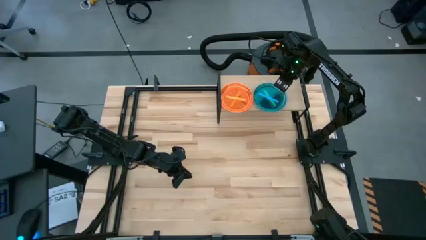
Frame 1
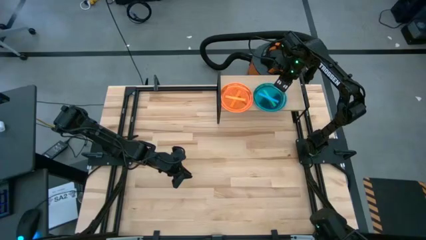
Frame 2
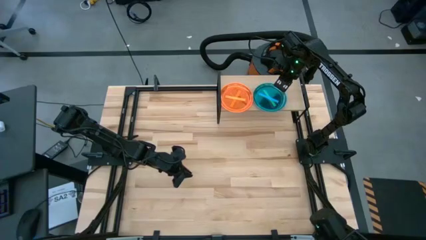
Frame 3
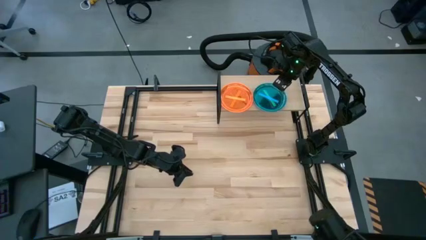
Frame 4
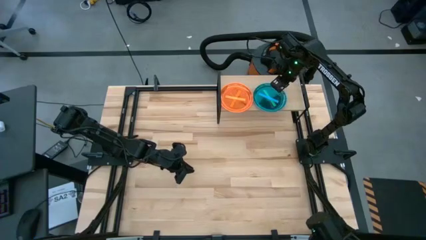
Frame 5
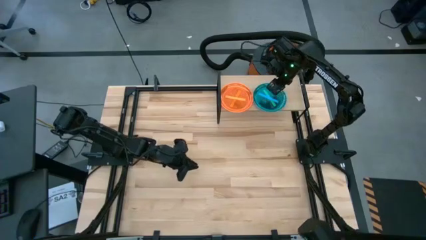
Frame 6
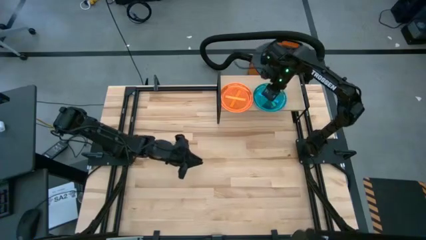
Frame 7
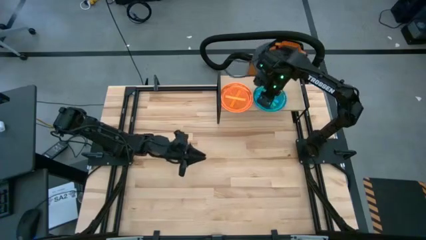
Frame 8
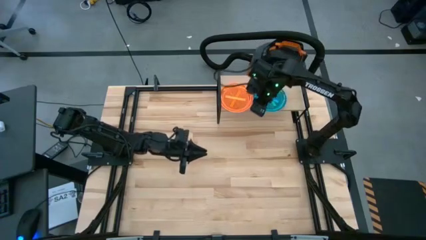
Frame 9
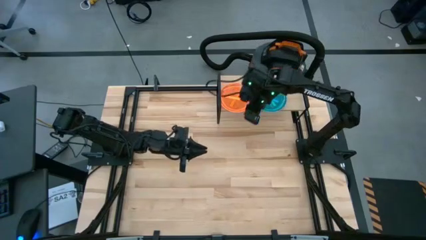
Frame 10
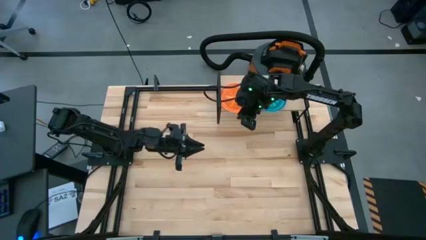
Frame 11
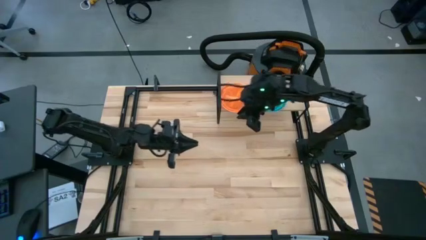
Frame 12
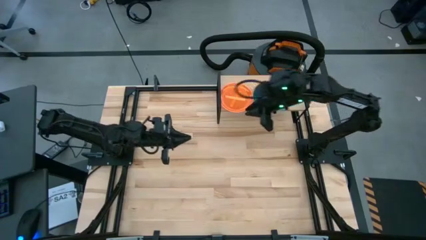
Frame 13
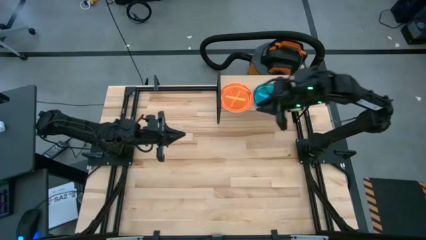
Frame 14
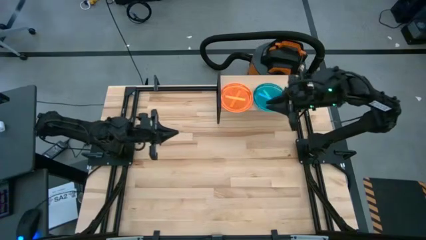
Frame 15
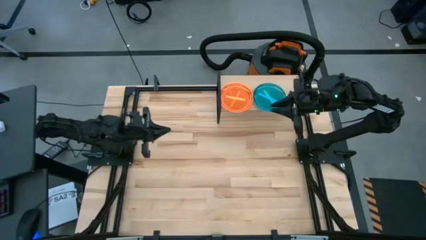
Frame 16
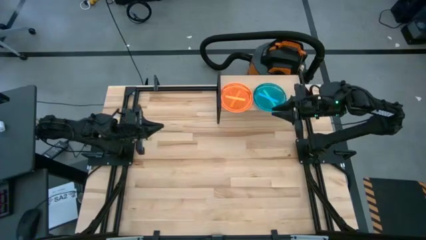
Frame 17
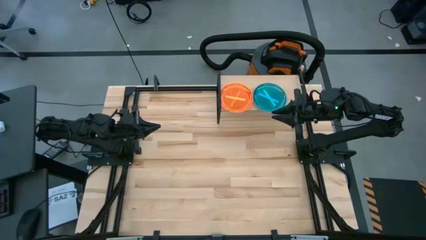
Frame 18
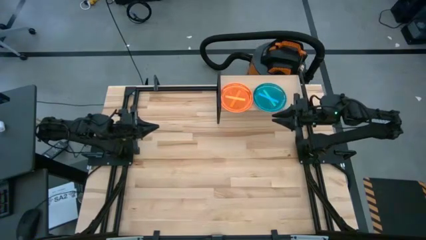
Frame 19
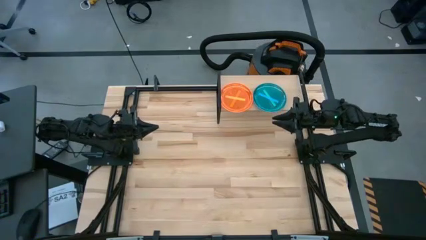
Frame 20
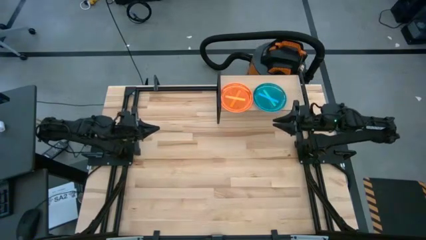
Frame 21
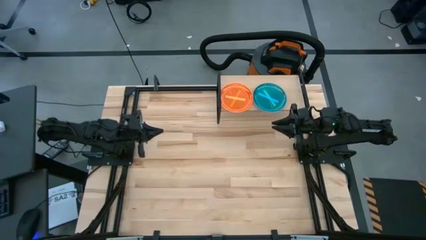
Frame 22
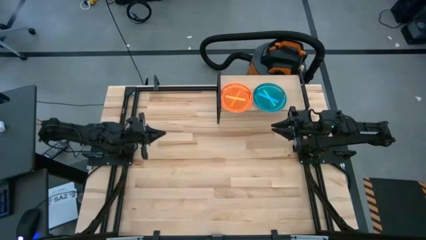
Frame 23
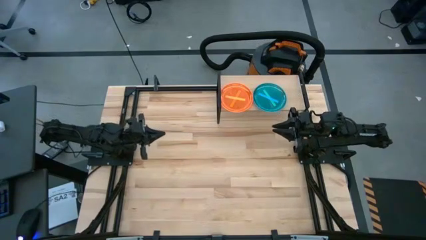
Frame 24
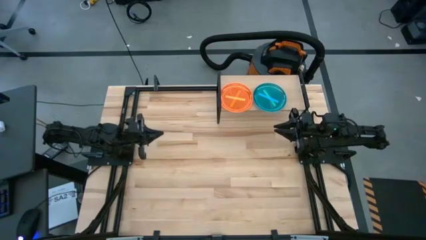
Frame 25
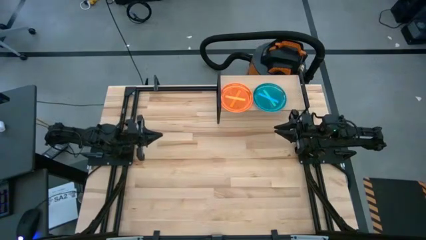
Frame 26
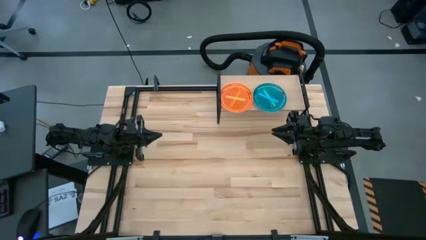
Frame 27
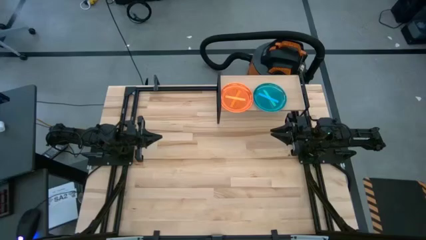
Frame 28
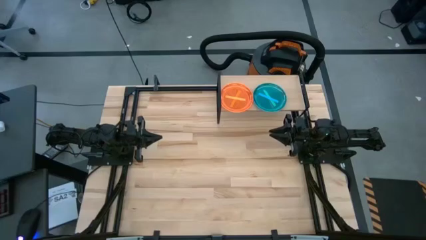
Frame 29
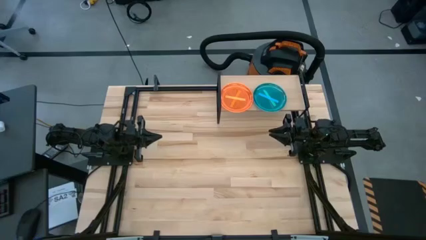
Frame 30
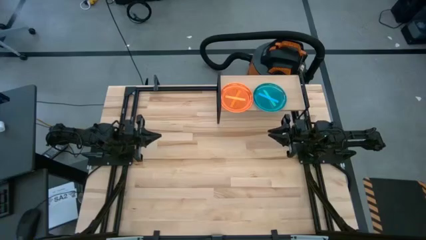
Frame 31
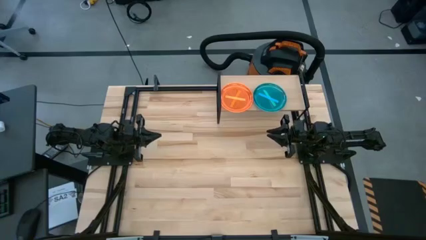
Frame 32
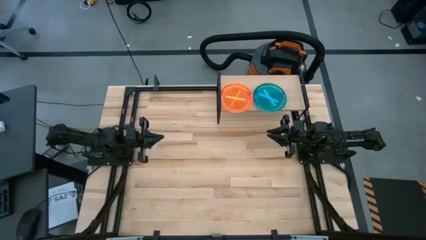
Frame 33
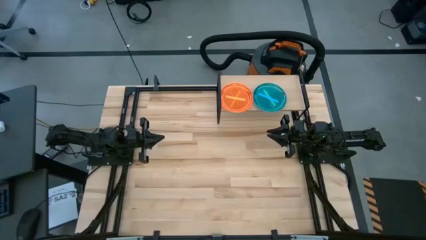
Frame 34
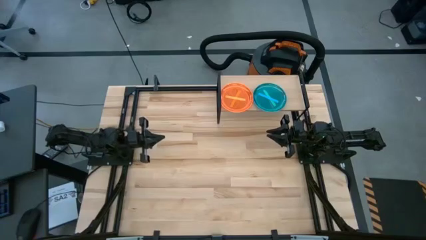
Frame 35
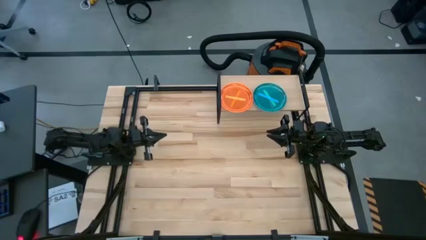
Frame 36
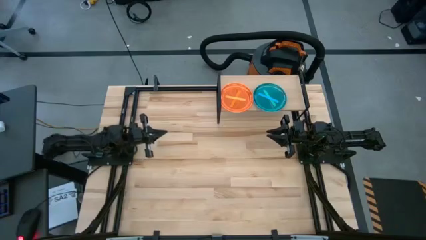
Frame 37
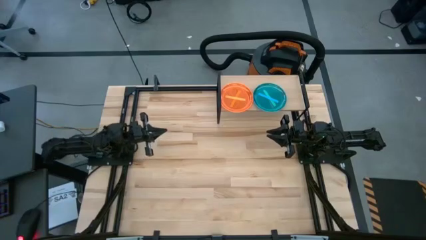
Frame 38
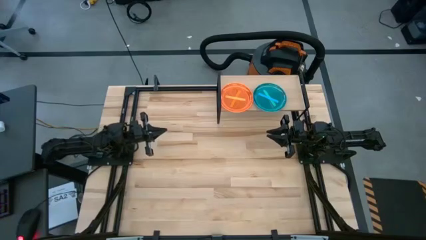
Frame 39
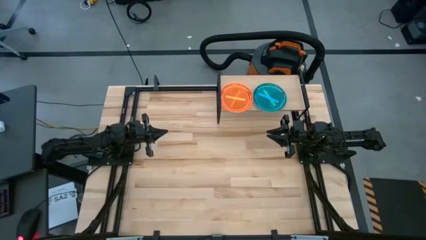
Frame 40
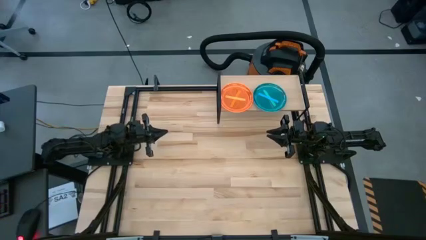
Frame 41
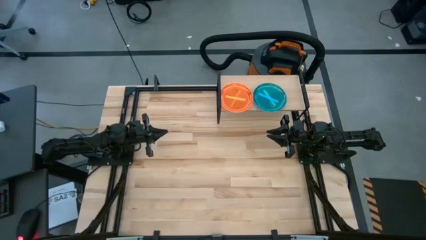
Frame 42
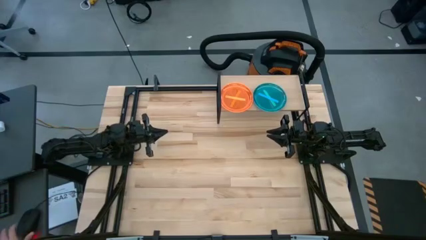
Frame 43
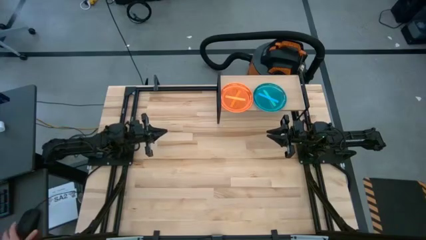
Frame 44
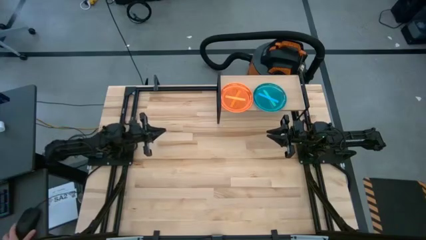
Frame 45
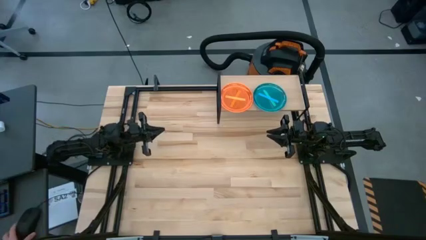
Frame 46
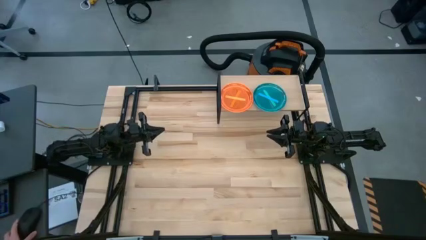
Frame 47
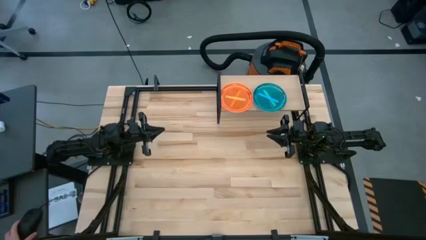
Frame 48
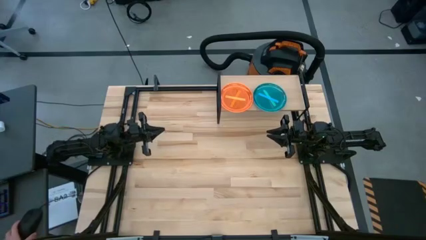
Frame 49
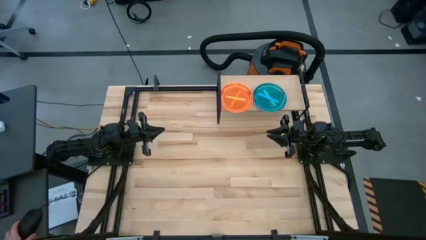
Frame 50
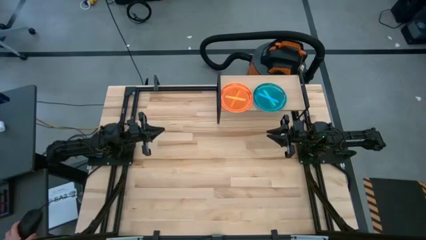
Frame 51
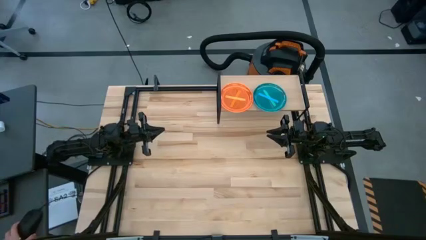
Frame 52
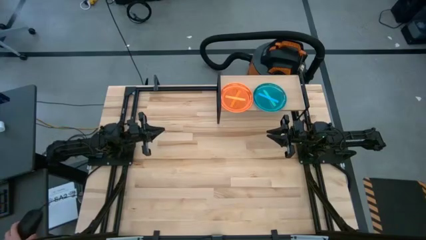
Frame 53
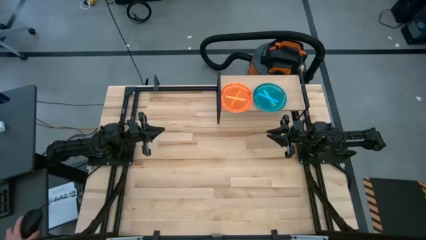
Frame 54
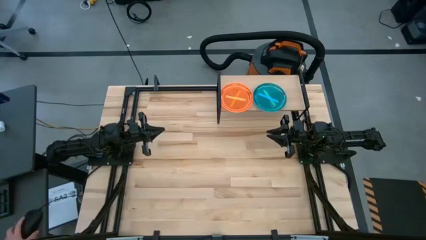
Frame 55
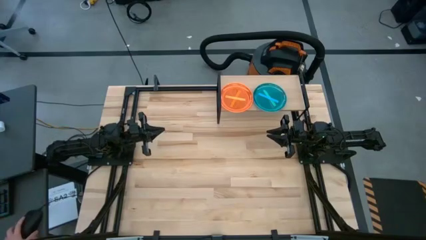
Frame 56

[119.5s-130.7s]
Task: Place and stack plates onto a shelf
Return to Home Position

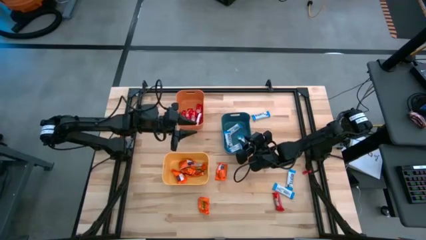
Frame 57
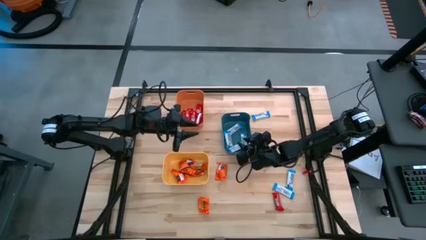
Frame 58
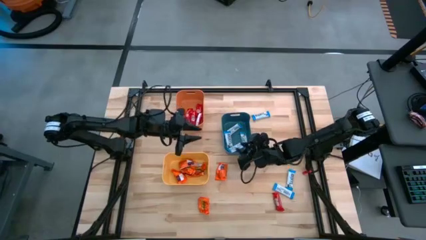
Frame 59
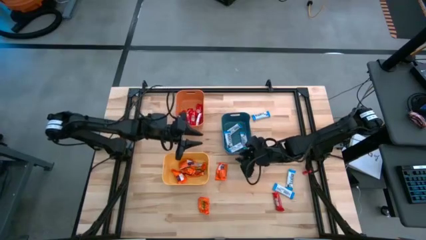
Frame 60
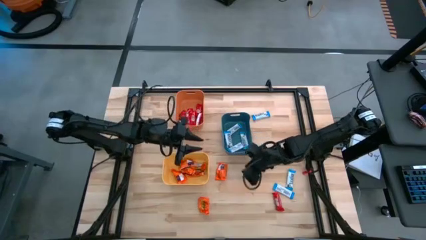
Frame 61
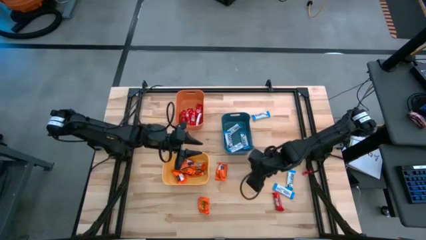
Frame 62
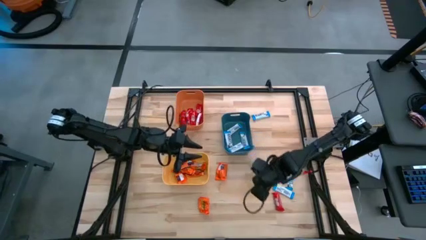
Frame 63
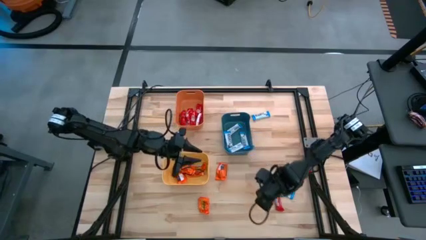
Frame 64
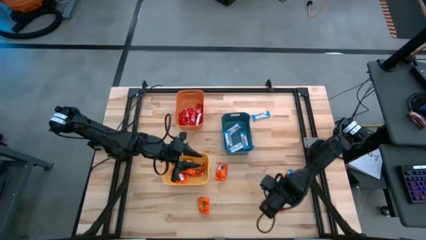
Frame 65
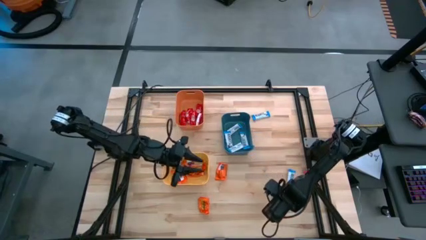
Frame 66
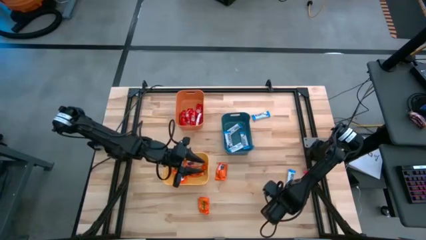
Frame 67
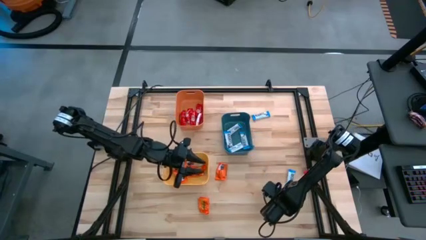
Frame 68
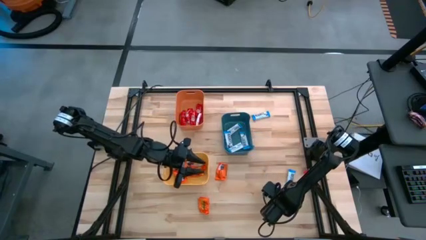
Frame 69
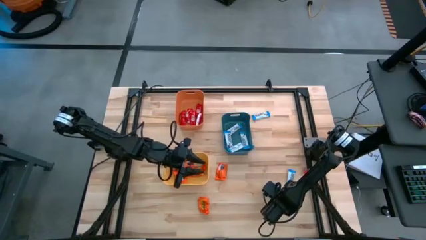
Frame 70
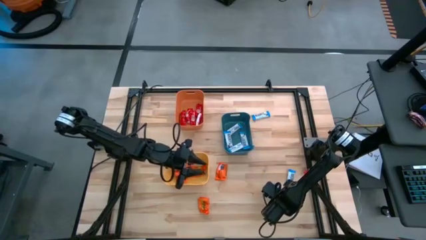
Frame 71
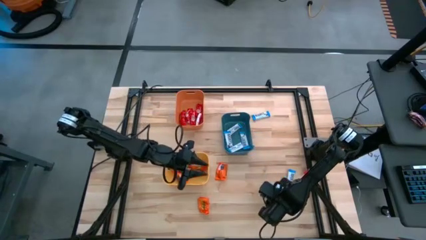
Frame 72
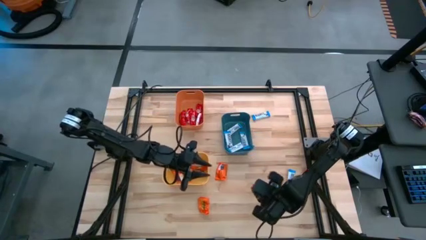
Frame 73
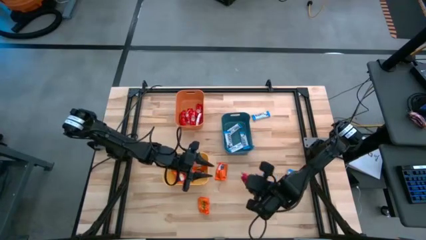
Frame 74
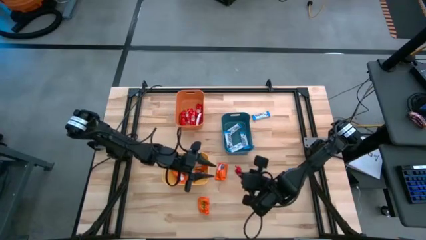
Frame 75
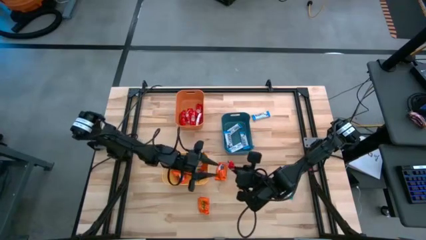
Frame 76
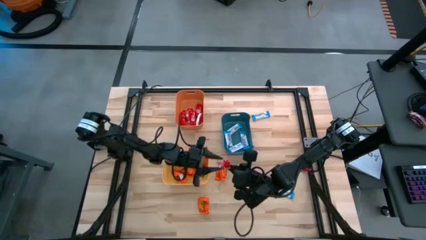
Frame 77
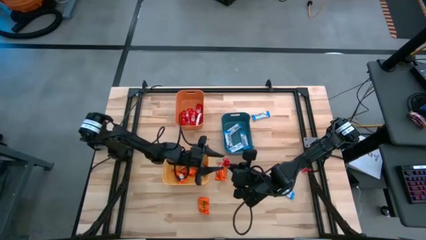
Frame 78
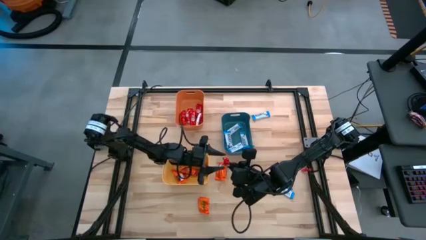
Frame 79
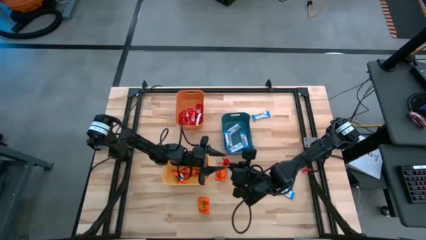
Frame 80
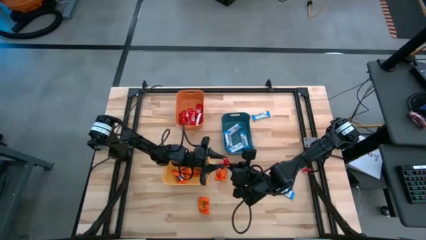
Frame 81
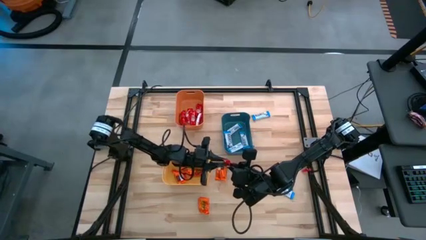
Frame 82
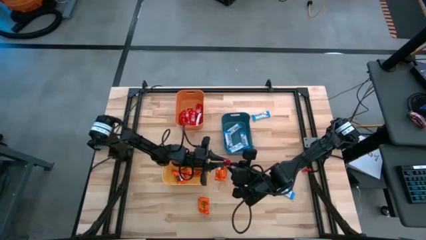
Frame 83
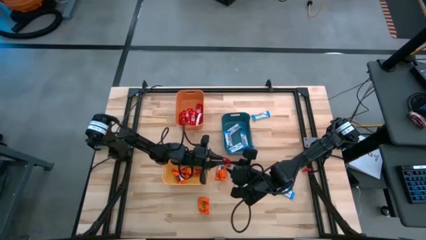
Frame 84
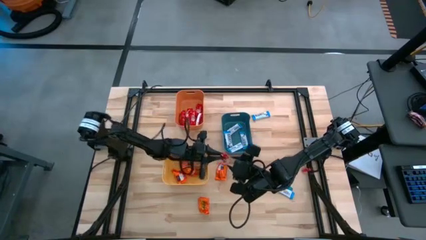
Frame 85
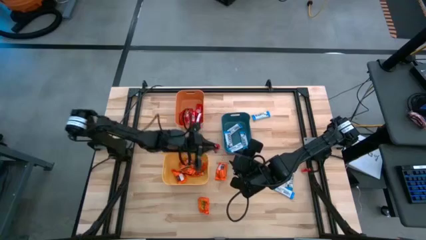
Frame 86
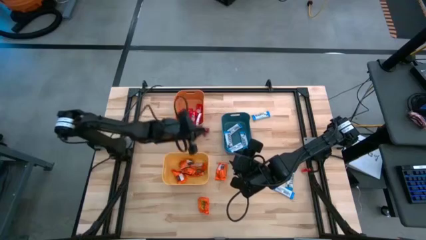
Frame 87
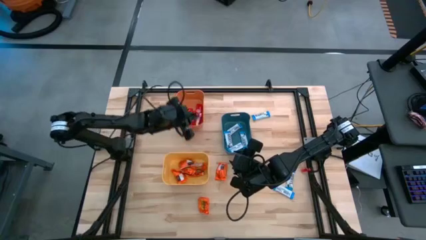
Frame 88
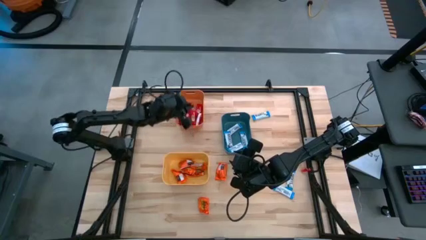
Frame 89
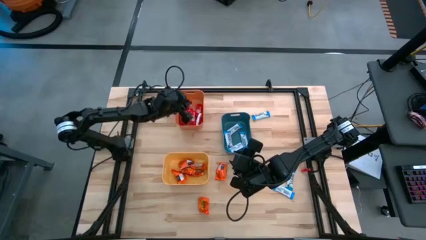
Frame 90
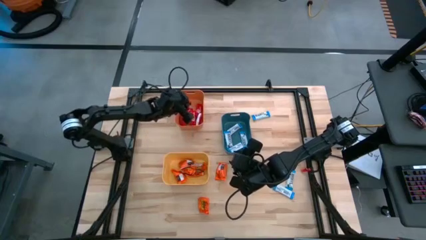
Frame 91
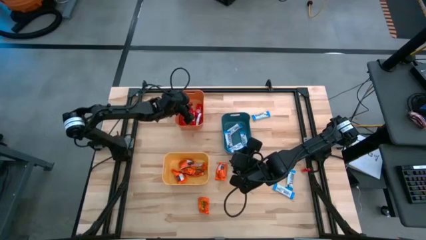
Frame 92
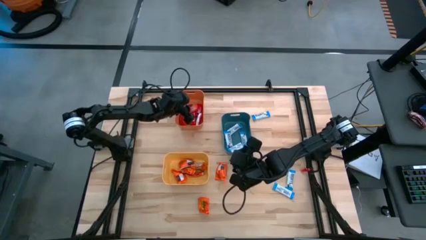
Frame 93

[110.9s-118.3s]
Task: Organize candy in baskets
Put the red chocolate into the orange bin
